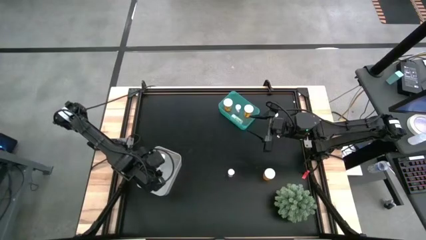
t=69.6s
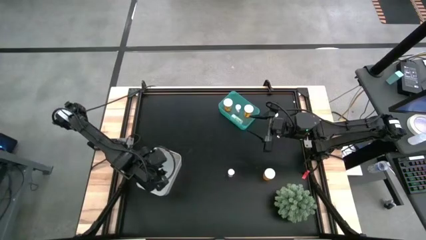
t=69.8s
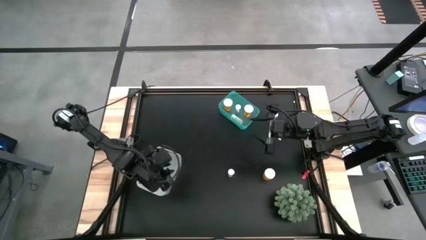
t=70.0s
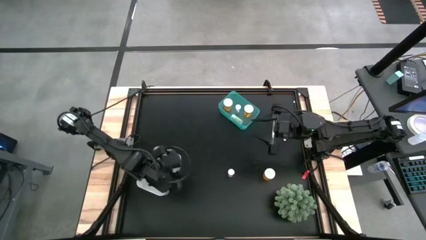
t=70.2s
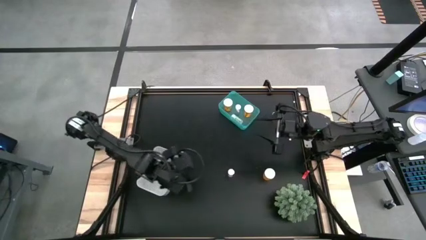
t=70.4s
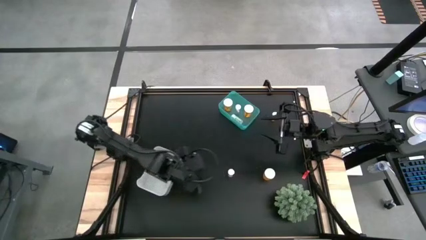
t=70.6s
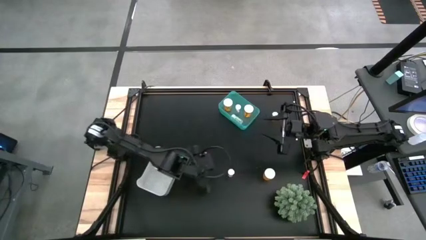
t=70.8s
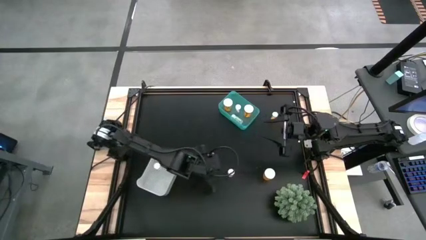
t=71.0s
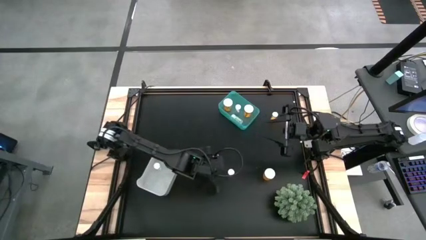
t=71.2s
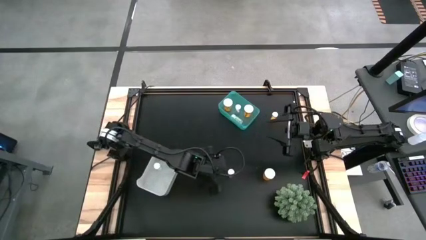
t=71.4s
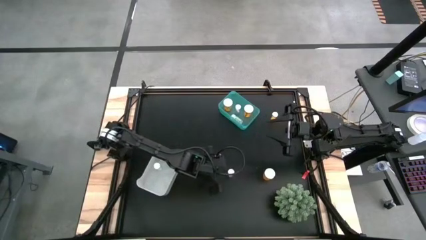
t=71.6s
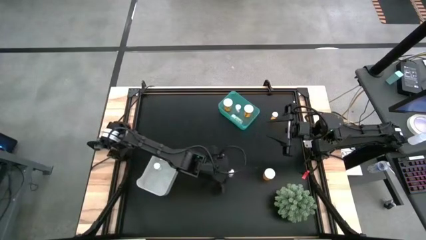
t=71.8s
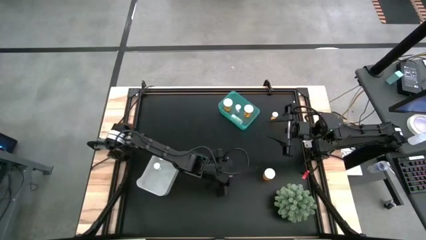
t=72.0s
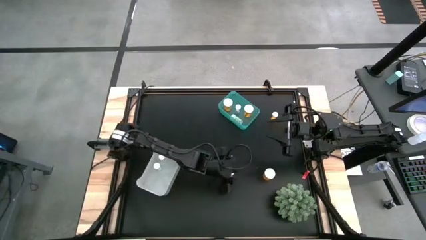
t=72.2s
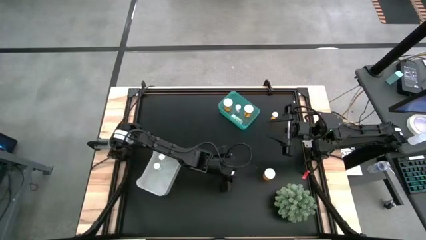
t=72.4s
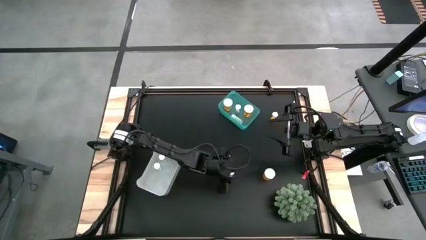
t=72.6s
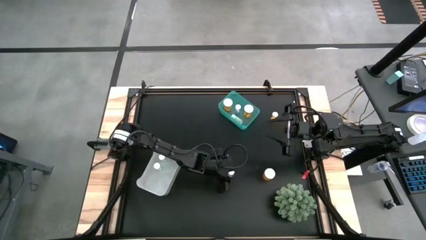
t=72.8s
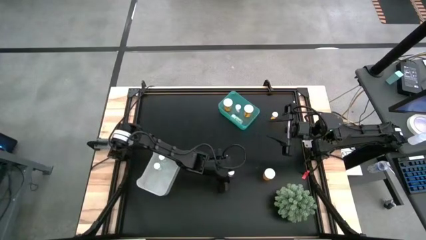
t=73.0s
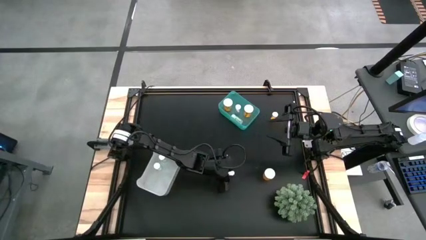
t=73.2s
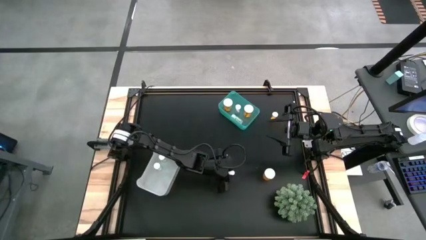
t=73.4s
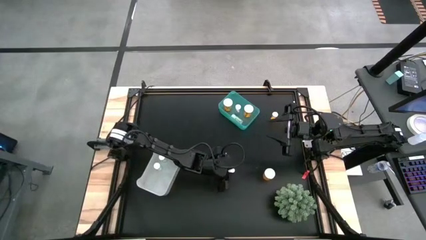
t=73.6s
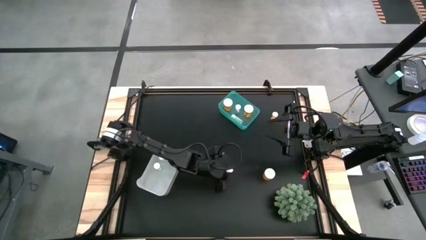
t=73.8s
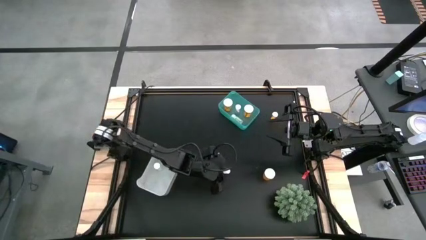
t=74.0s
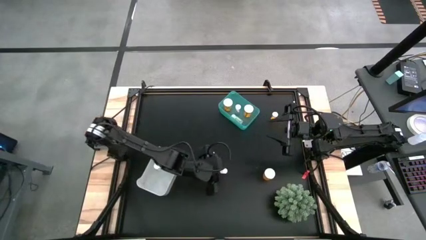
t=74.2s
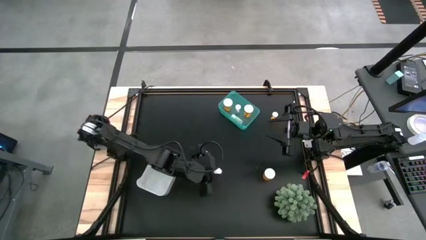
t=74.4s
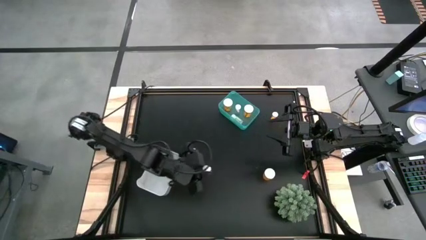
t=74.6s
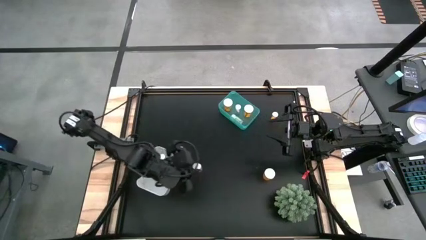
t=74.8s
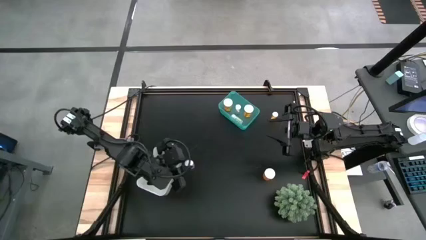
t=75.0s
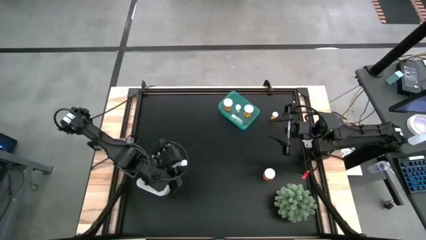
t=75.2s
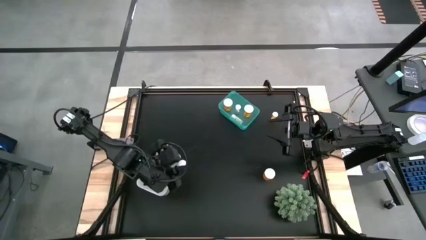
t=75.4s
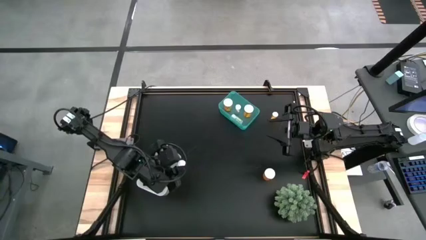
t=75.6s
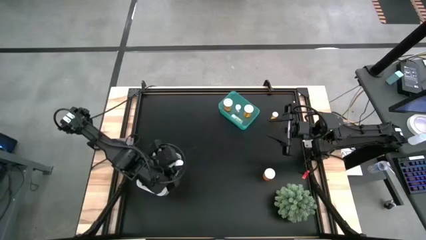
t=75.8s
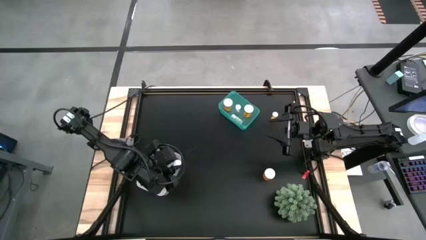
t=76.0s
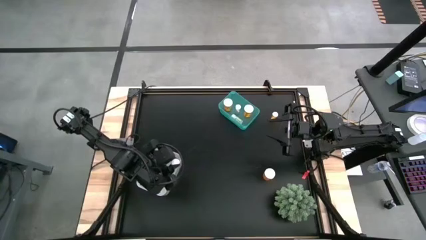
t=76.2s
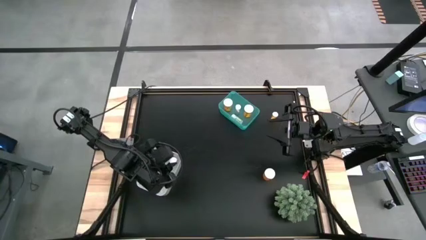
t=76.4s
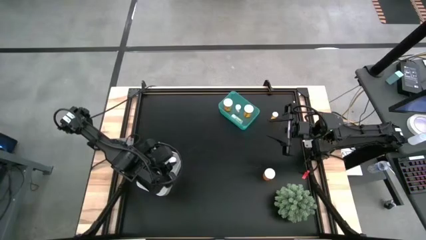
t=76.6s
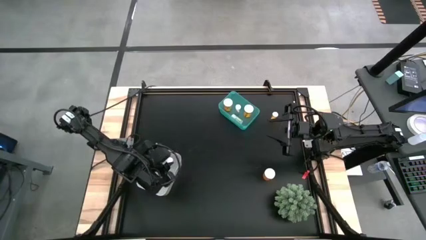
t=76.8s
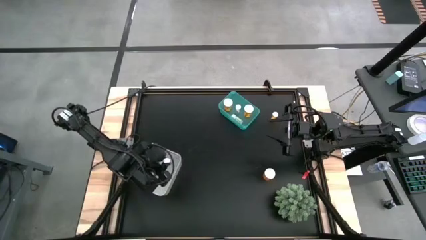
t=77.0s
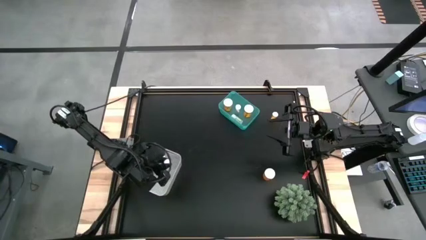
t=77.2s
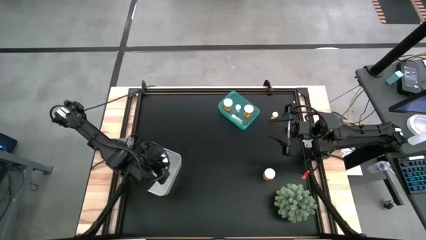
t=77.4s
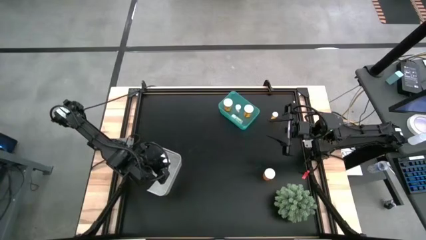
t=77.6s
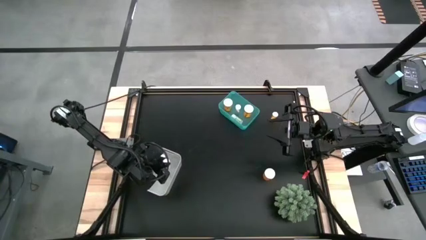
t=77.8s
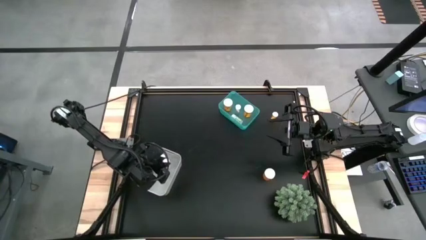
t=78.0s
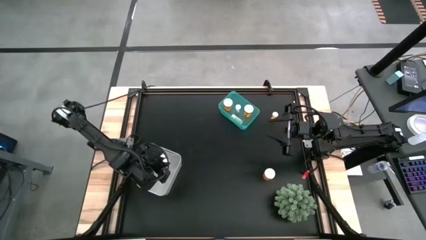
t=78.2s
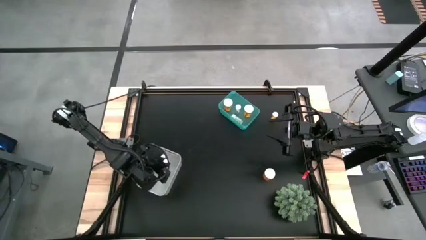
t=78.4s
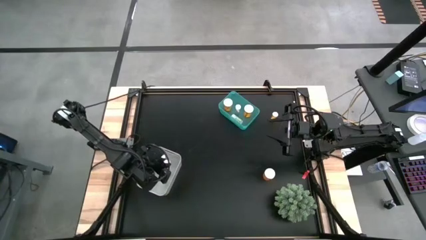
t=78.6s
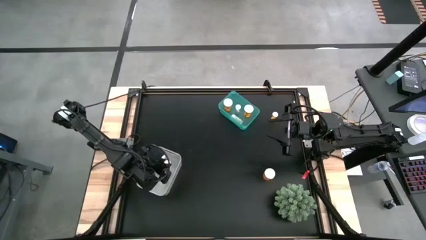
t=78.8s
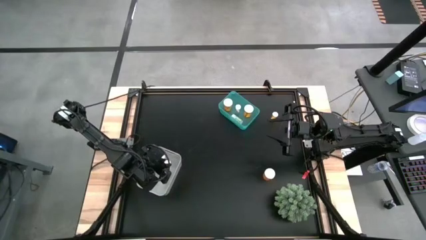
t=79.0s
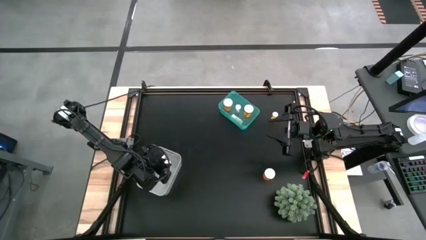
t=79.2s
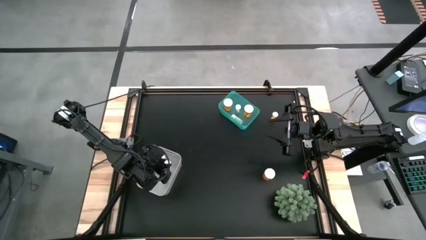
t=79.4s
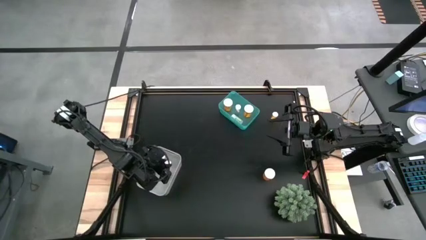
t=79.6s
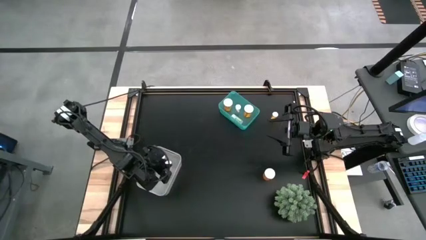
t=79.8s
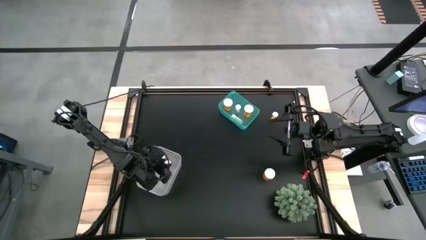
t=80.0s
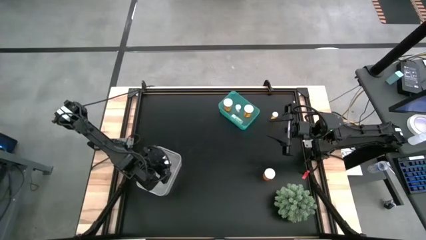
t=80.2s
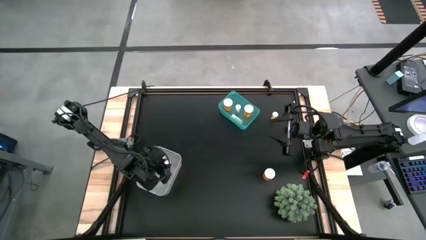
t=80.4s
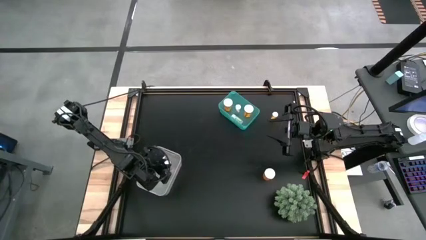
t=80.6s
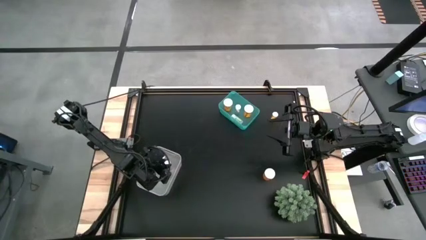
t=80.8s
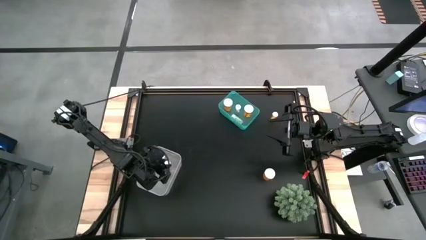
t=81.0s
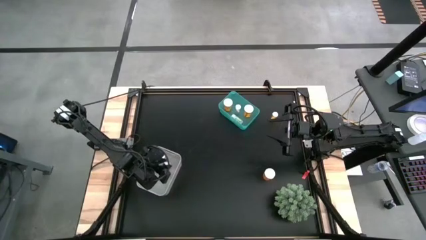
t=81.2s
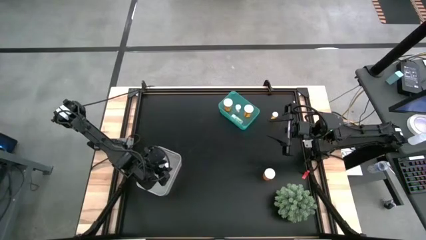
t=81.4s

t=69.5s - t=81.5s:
Task: Pick and place medicine bottles into bin by pill shape (circle, oval)
Put the pink tablet bottle into the gray bin
